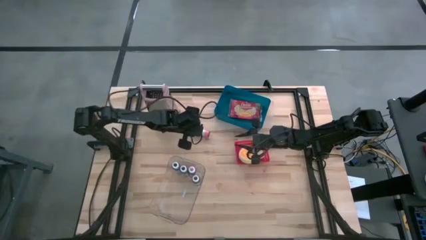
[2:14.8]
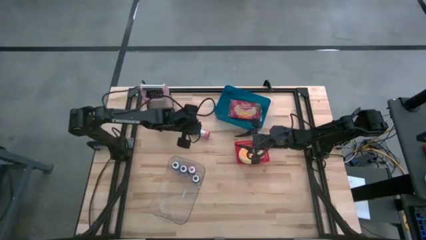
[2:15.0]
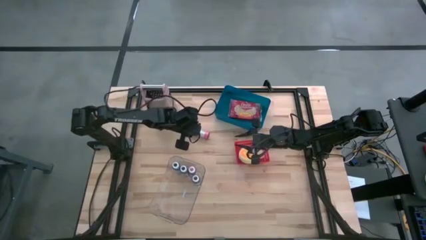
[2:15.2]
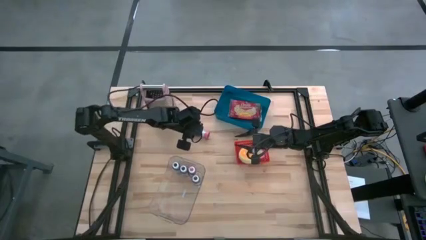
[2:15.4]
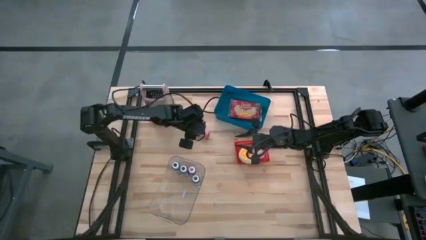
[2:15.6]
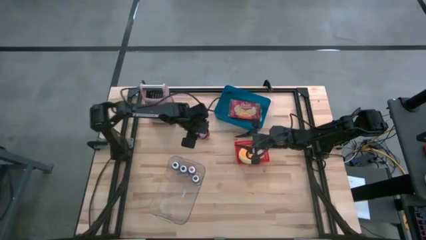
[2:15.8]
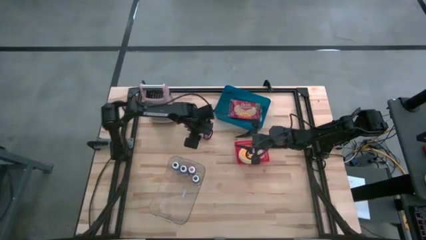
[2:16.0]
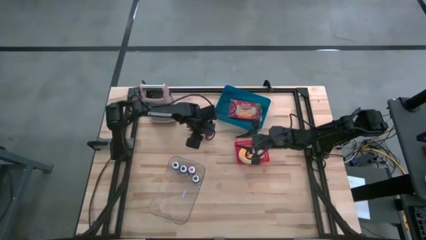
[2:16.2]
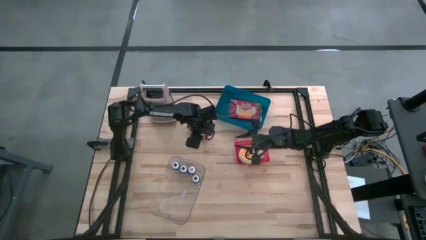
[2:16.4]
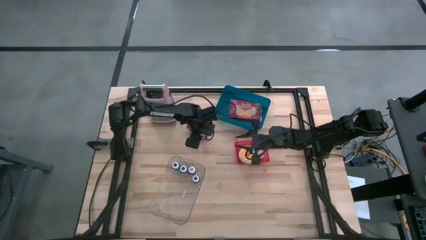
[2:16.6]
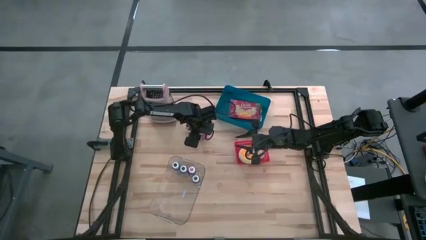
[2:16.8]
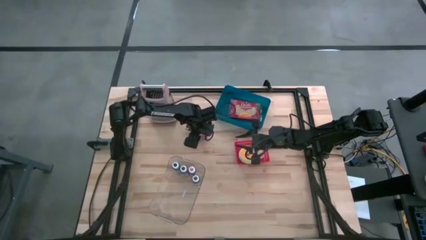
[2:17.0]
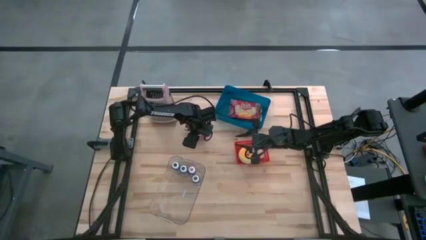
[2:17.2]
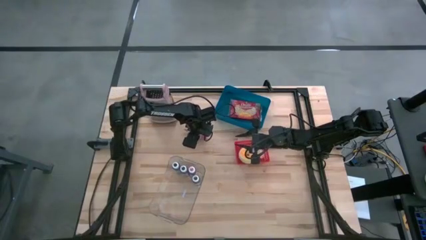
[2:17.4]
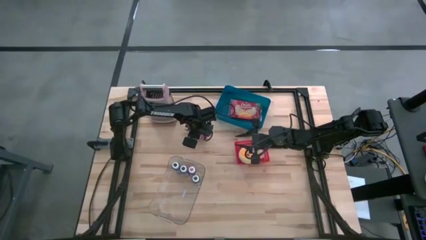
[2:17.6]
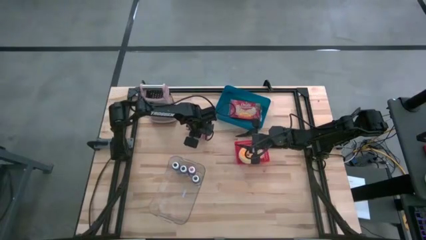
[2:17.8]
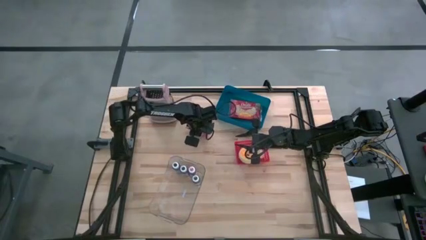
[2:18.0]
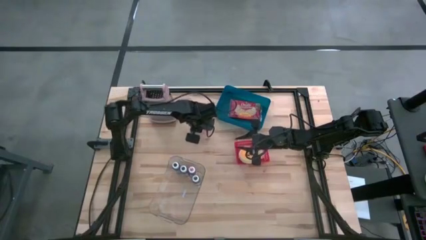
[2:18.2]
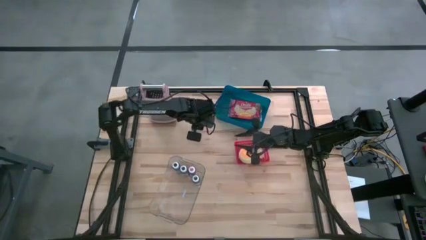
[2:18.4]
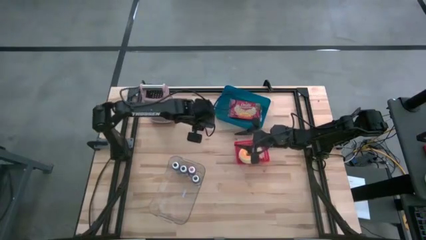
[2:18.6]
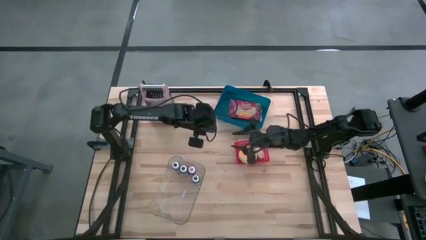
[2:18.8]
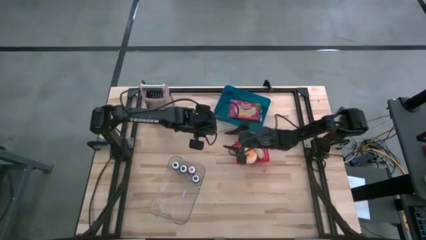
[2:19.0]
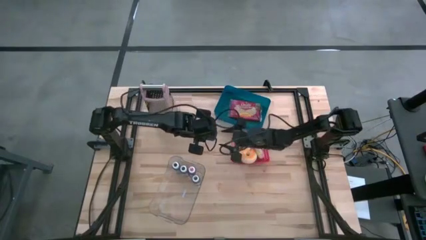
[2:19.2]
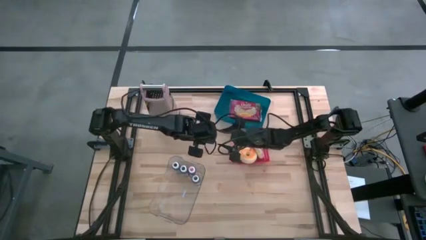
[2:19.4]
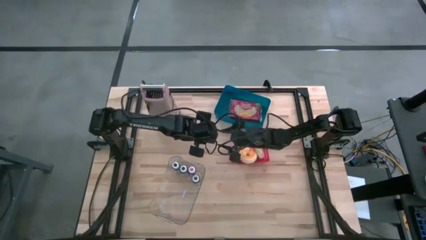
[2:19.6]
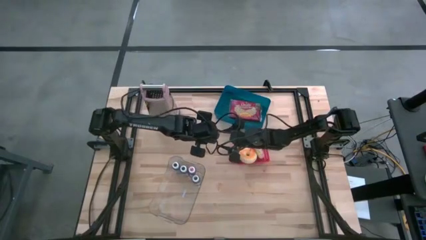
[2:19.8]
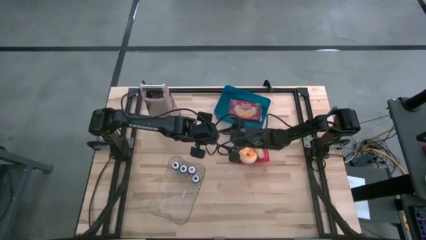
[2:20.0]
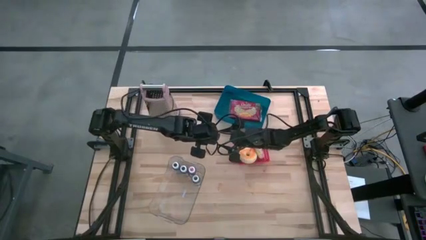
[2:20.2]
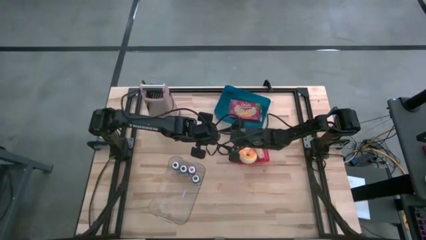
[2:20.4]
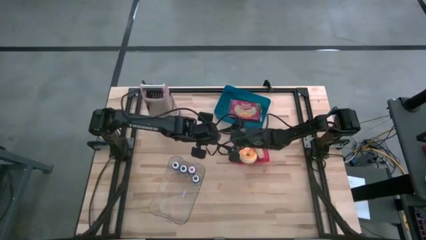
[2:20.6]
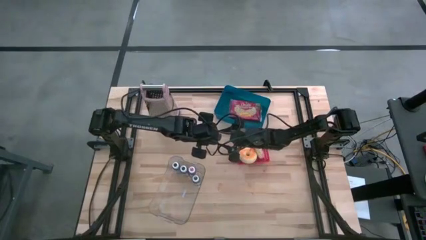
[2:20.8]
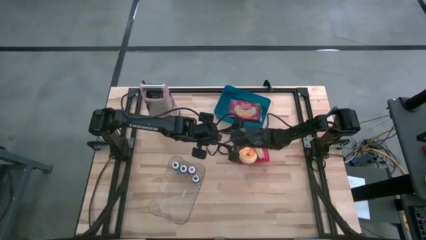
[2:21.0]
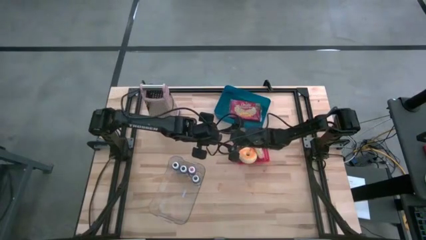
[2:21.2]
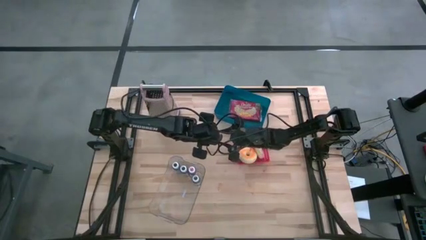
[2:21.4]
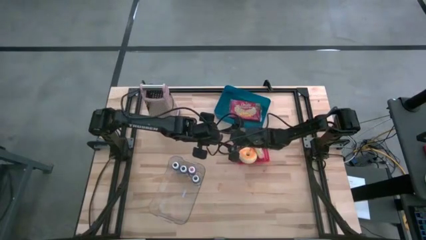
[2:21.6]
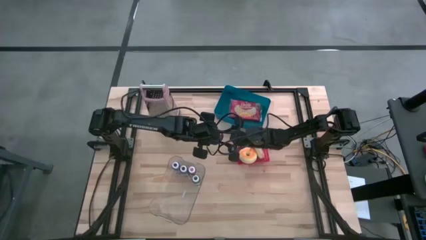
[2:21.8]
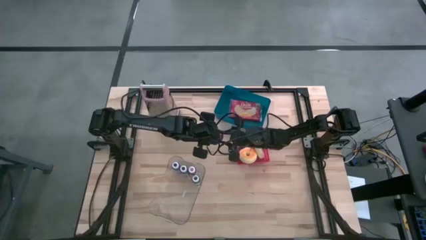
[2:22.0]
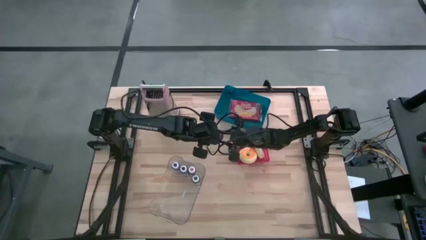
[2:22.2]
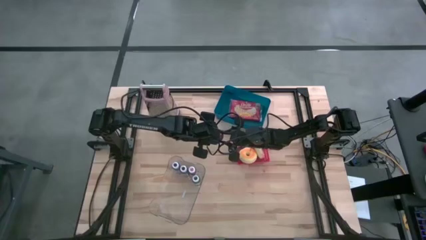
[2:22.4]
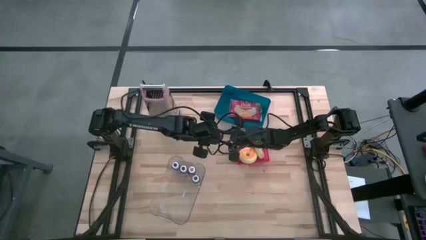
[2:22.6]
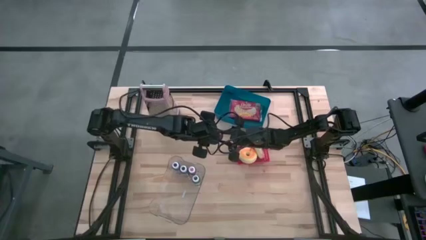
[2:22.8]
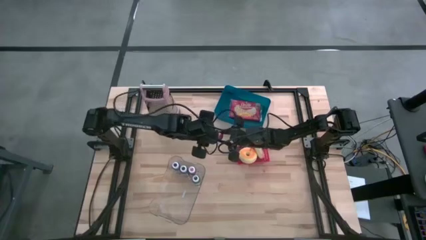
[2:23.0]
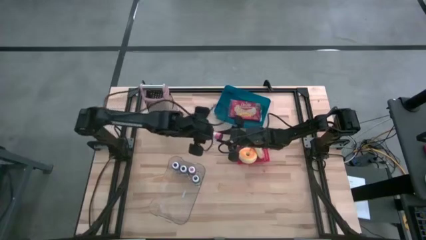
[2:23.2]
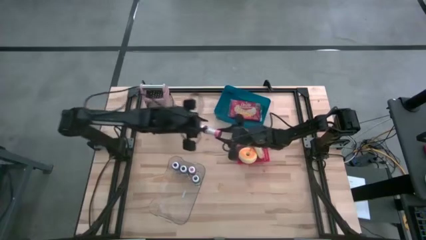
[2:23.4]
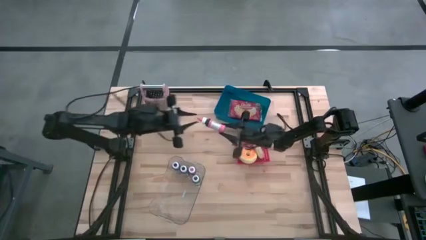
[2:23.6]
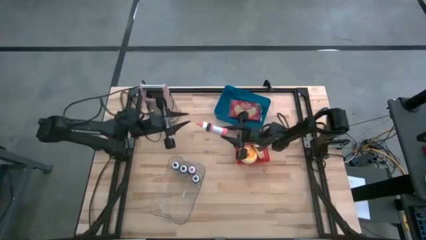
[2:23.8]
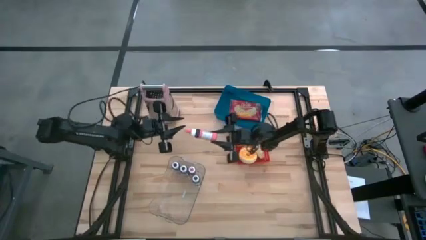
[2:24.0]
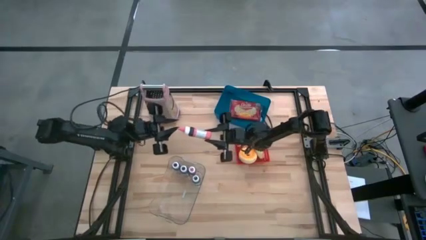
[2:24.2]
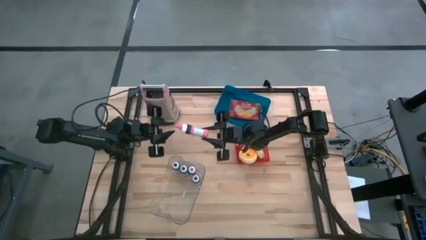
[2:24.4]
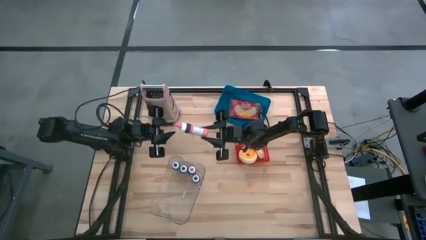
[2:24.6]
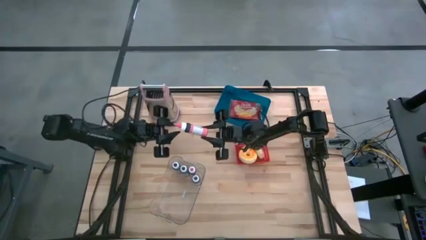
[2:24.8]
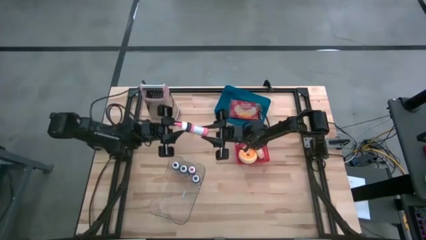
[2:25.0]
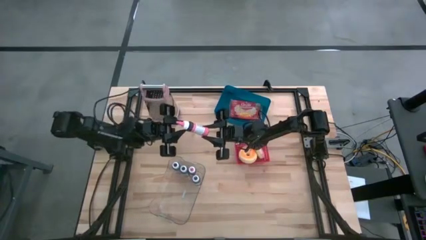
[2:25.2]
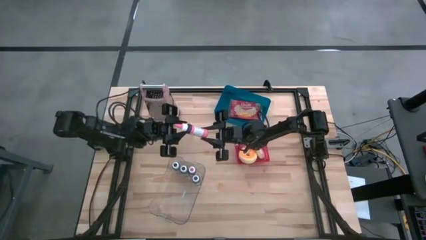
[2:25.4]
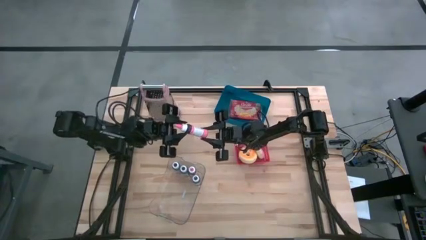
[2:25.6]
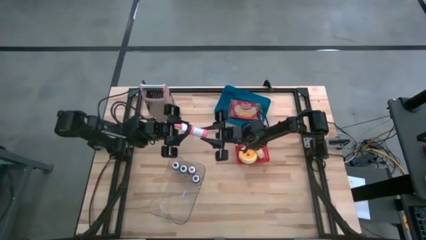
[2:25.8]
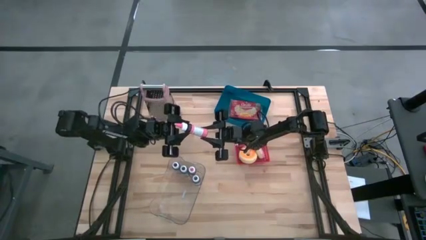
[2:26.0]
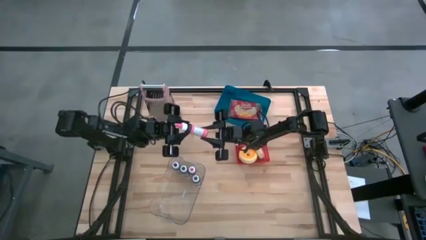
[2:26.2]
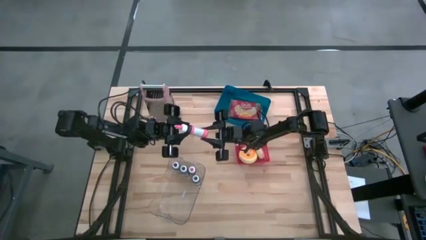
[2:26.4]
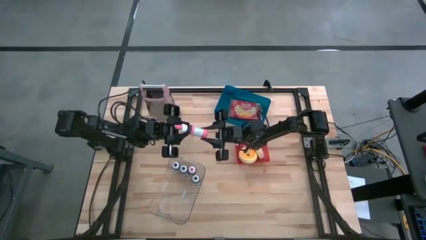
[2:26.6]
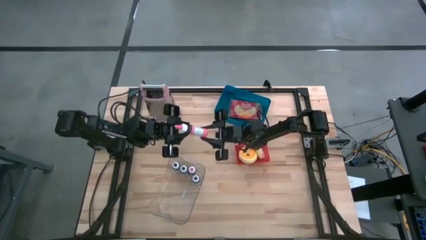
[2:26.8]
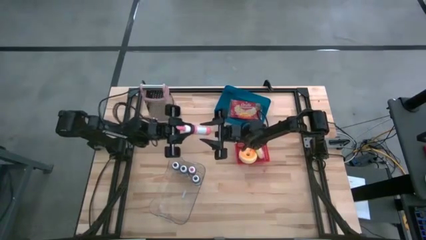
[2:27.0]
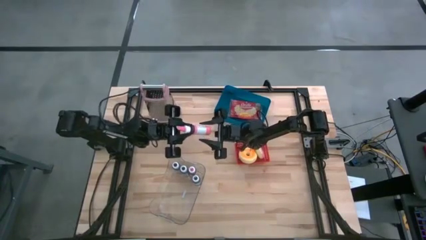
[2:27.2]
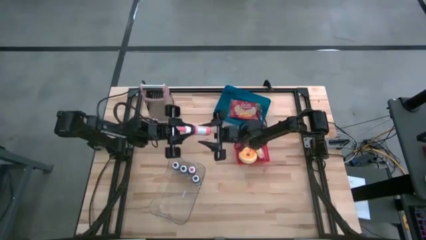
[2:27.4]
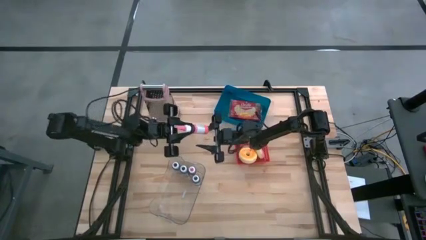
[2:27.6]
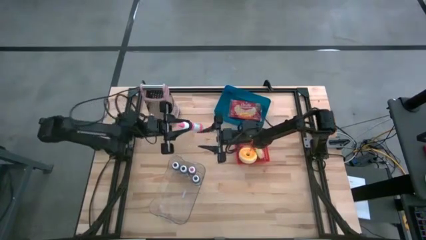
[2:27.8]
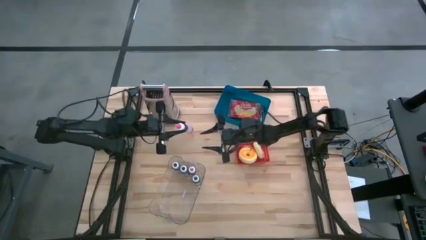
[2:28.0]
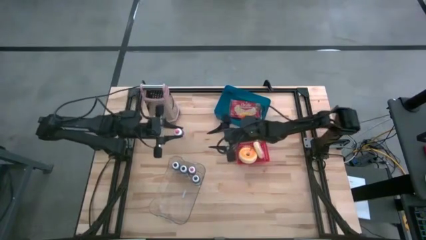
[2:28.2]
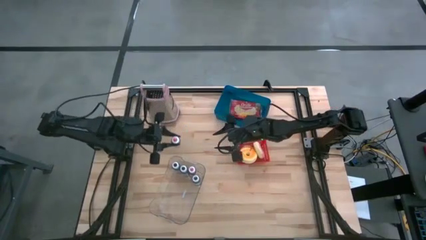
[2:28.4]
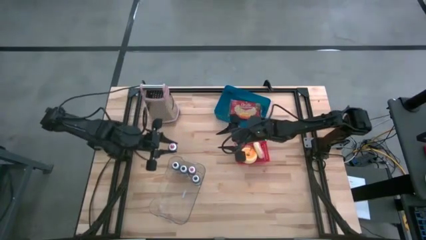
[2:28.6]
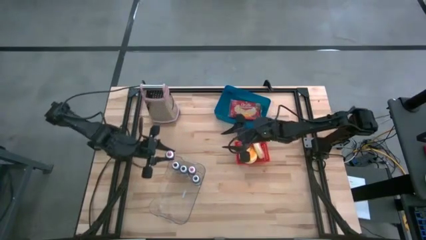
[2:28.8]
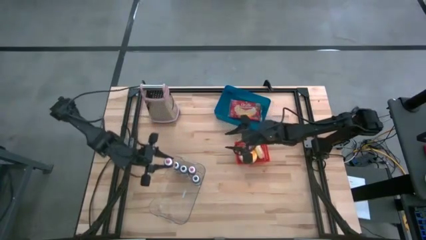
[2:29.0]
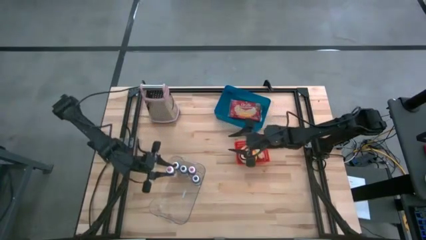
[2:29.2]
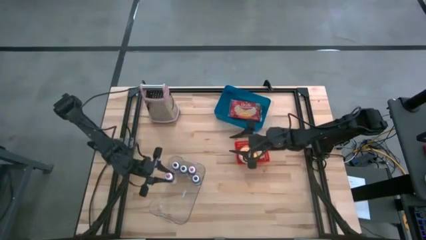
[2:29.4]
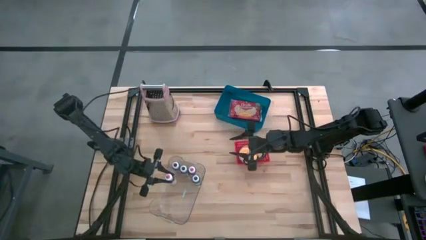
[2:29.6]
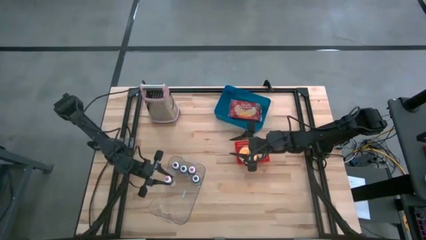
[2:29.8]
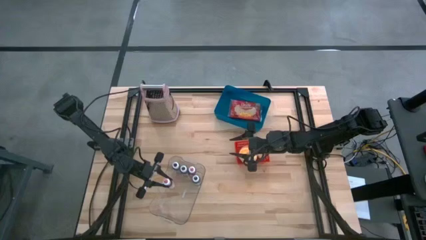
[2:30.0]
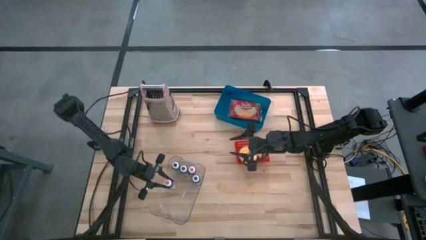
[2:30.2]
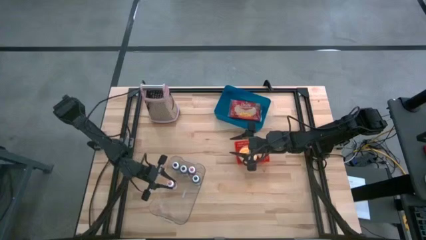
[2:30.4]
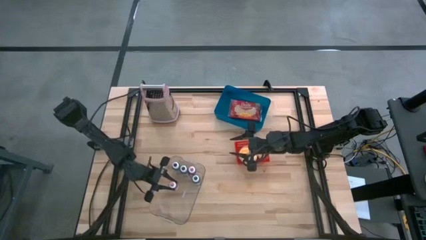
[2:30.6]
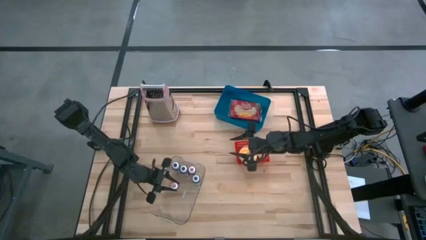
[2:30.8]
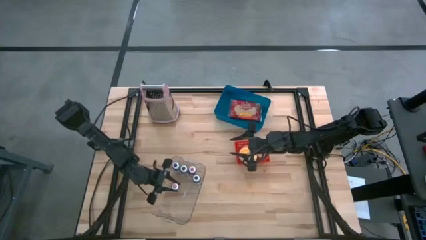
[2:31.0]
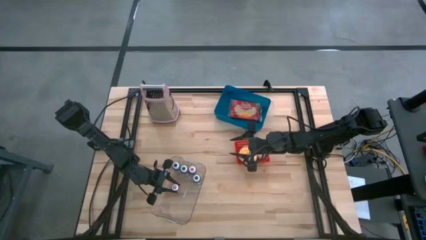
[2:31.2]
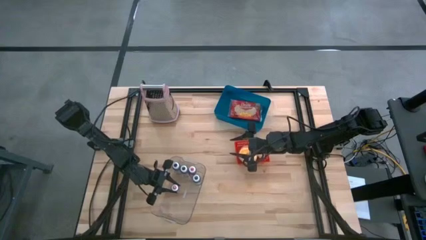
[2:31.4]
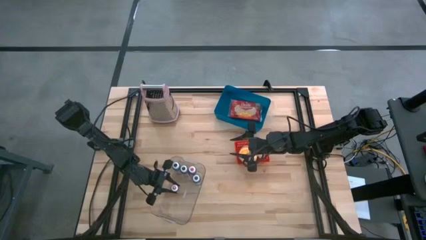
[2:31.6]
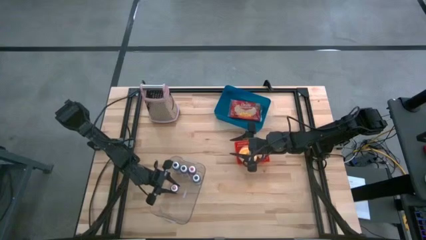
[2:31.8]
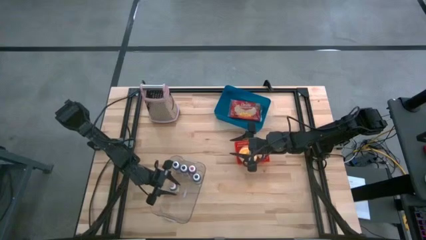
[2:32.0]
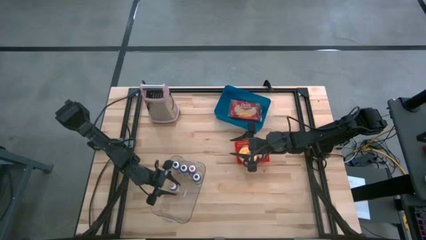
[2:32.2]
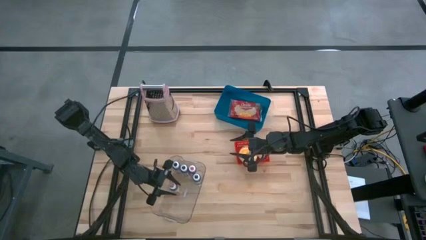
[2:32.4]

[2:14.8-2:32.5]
Task: Pick & Place Food Item
Put the pink food coloring bottle into the transparent bin

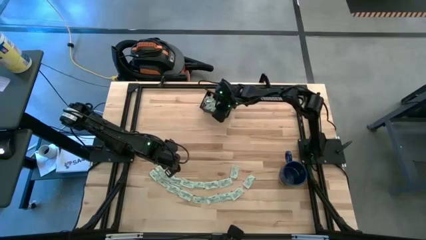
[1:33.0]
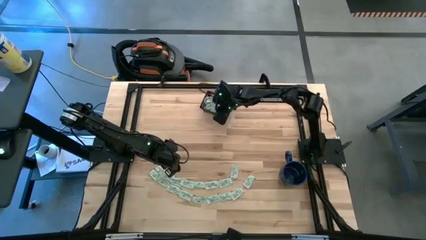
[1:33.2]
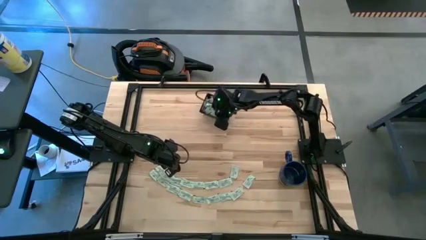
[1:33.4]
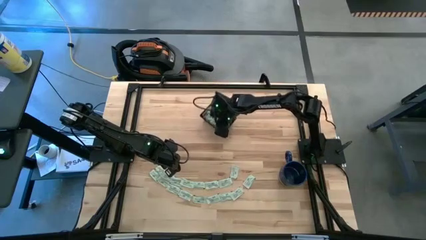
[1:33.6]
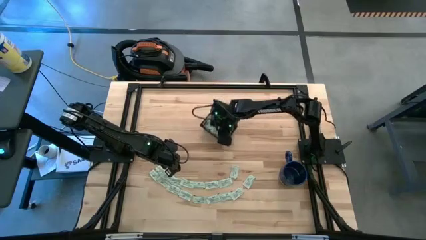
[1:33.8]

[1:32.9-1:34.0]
Task: Pick and place Stevia / Truvia into bins
Move the black bin to the center of the table
